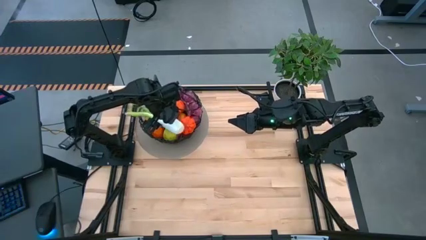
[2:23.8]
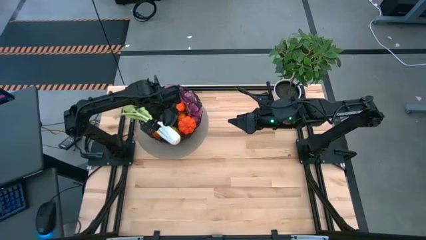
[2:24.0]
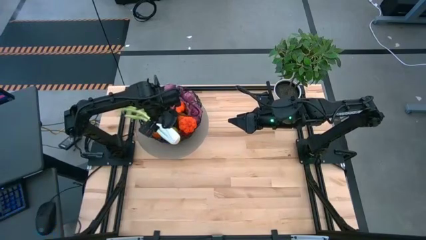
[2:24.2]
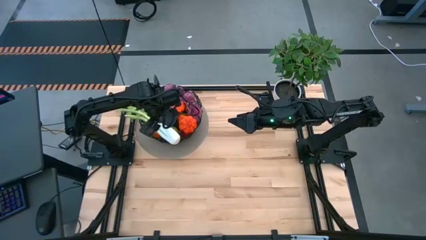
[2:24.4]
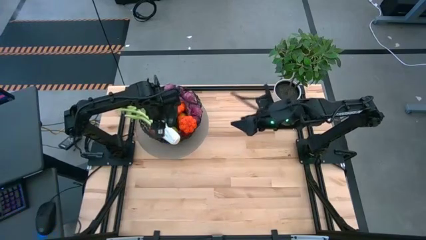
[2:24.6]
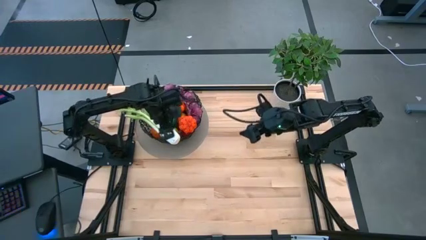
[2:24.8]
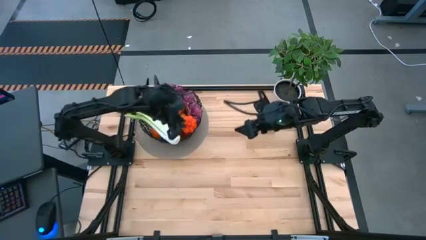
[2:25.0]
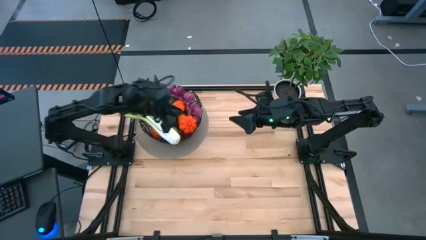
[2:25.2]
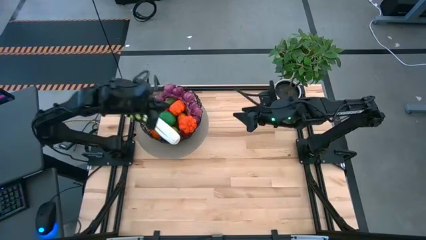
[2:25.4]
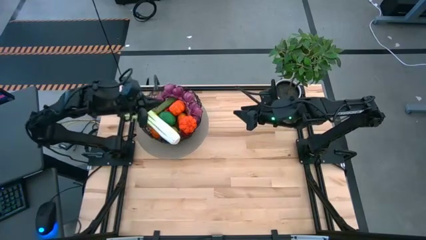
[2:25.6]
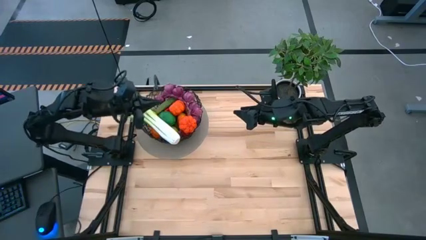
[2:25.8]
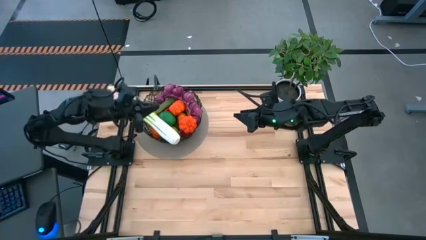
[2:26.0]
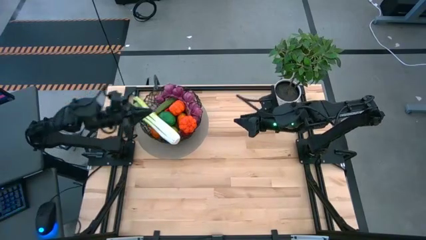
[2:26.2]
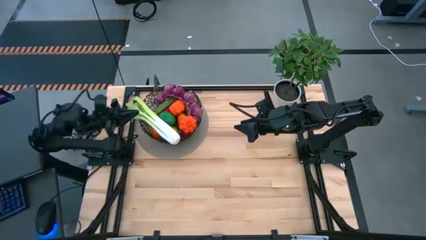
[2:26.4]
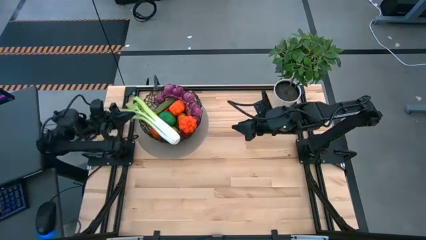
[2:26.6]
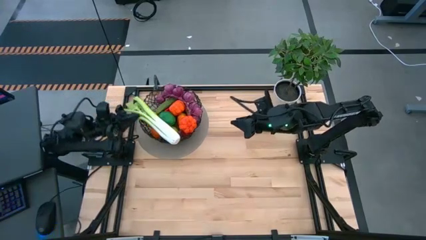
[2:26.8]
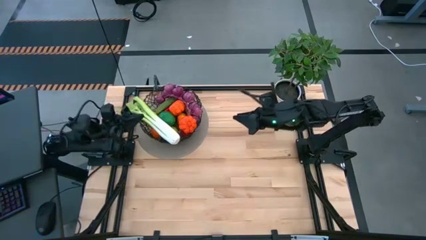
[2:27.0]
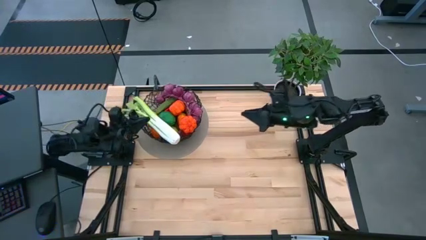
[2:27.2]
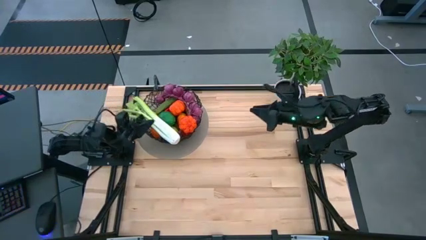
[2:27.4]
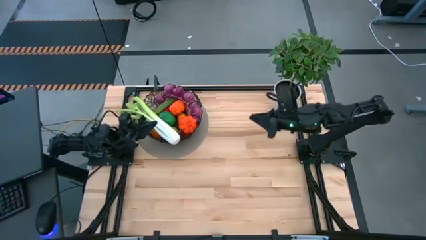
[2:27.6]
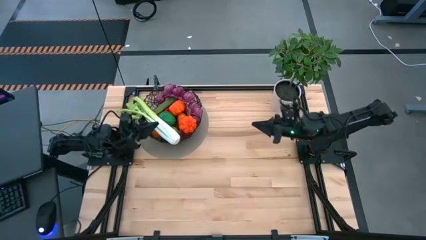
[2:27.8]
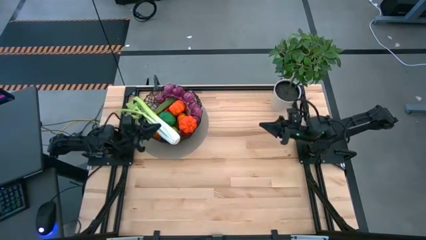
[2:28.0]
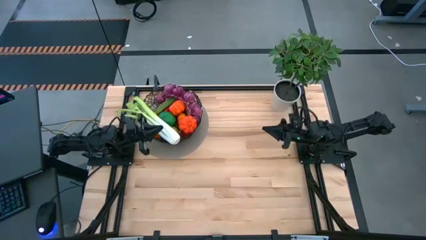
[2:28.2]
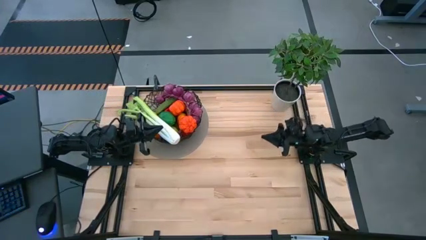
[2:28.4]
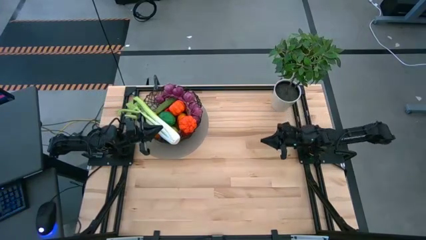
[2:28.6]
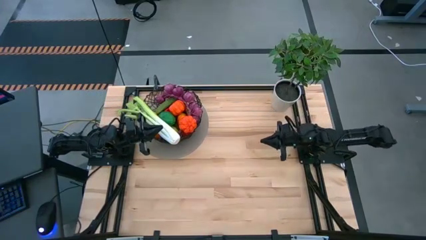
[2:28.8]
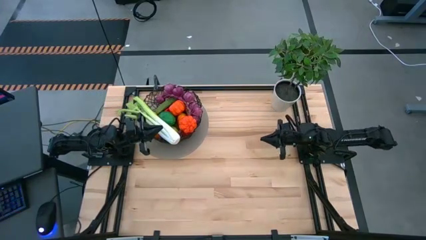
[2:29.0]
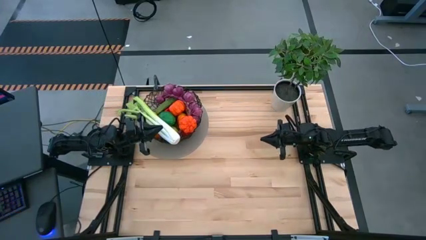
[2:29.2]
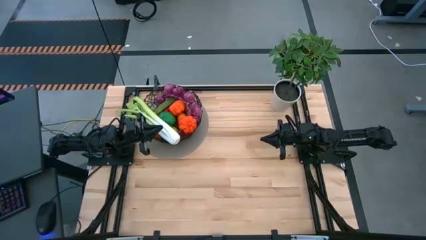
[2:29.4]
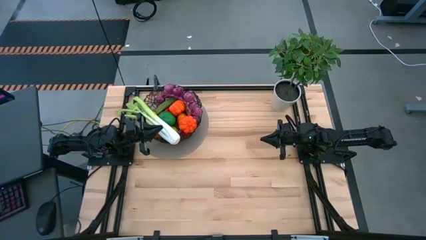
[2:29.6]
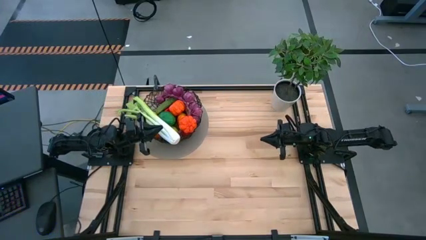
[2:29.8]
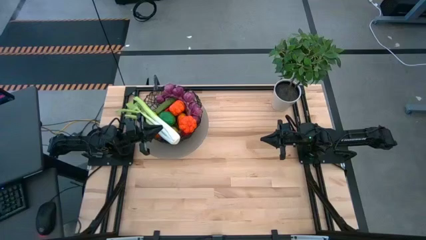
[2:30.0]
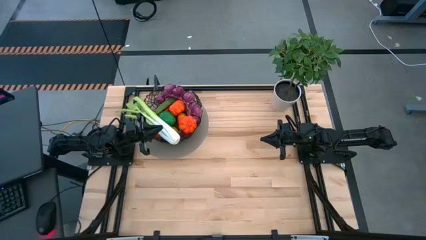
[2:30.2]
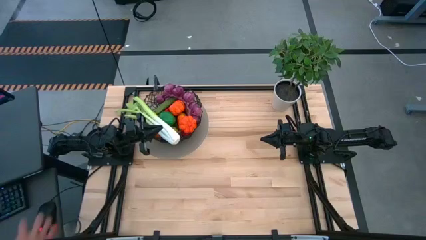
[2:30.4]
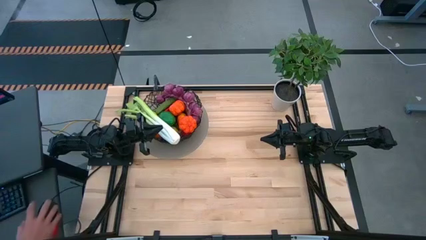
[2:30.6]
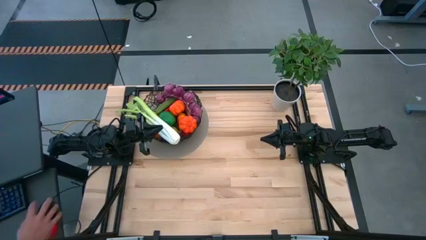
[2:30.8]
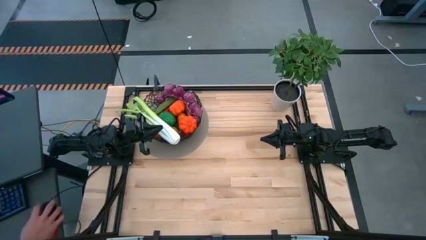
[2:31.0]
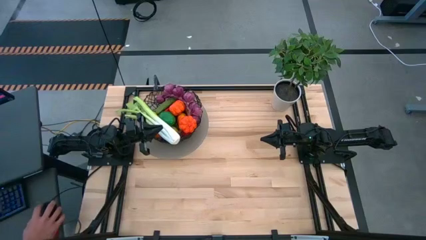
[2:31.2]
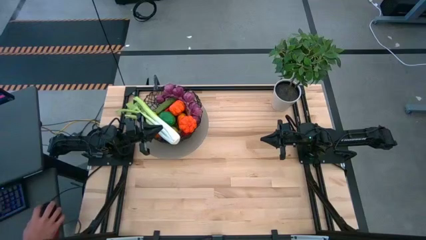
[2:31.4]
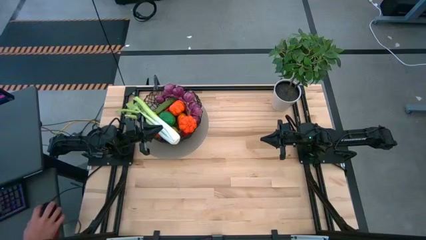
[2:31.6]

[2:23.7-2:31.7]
Task: Build produce basket
Return to Home Position

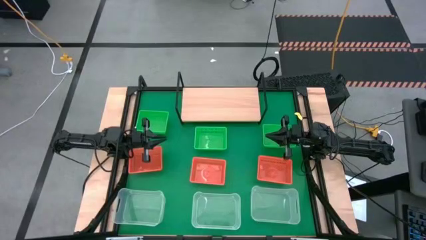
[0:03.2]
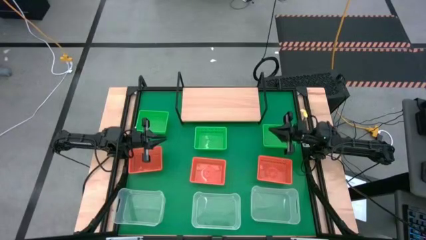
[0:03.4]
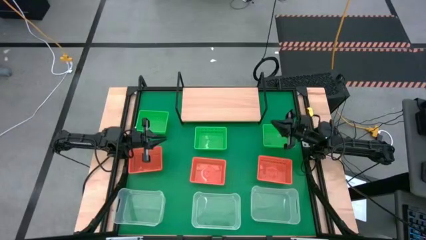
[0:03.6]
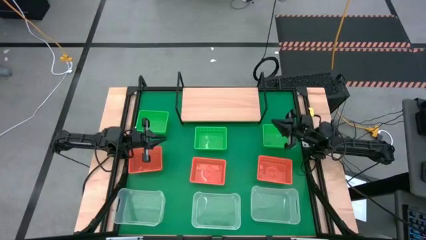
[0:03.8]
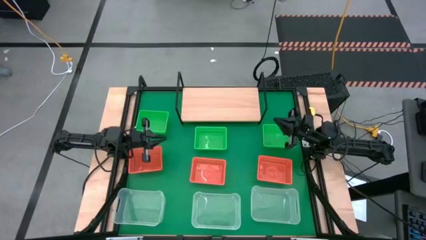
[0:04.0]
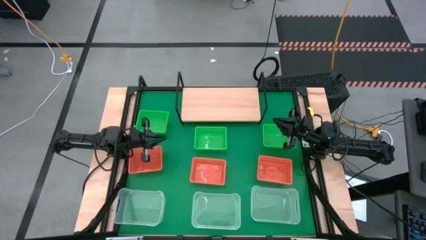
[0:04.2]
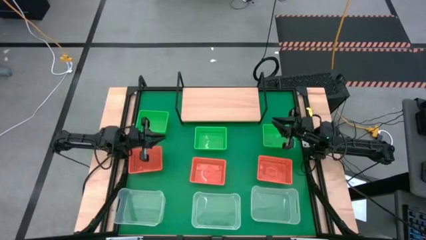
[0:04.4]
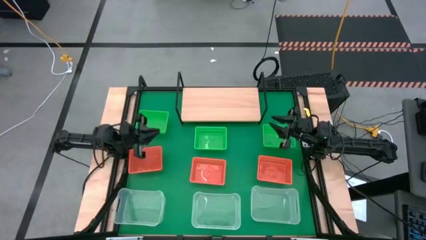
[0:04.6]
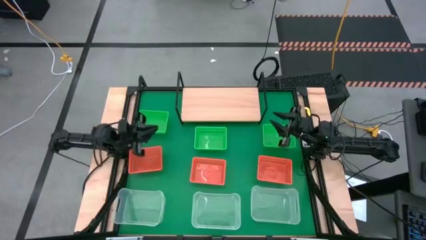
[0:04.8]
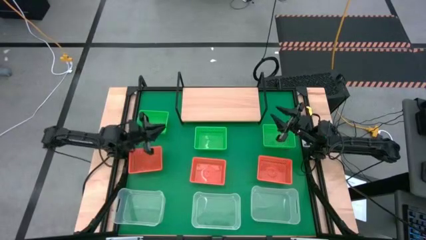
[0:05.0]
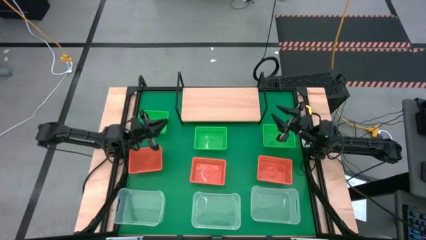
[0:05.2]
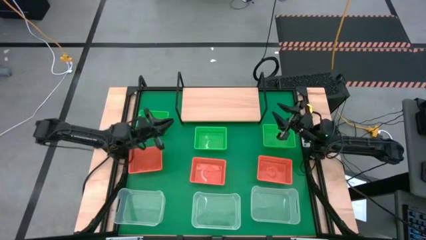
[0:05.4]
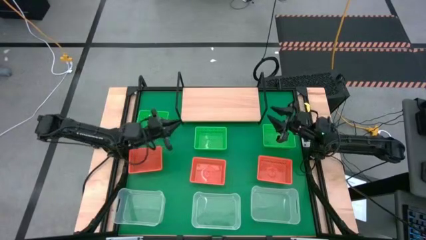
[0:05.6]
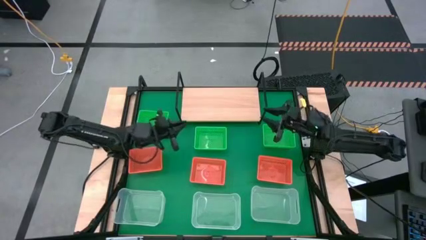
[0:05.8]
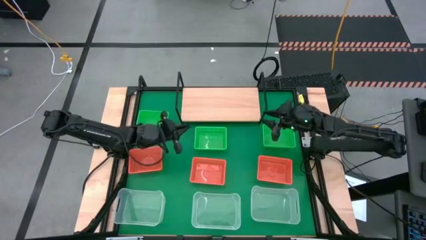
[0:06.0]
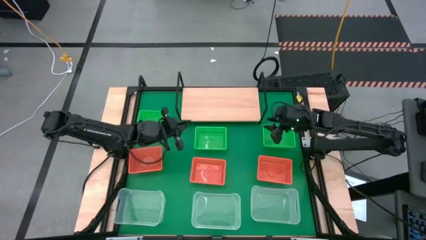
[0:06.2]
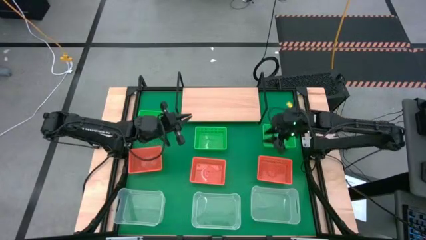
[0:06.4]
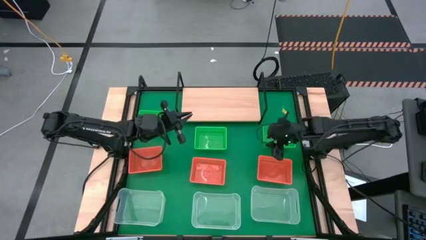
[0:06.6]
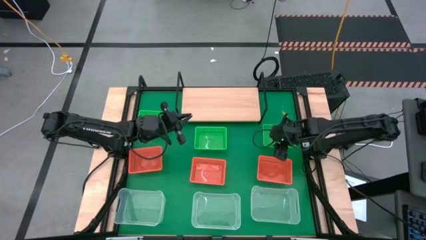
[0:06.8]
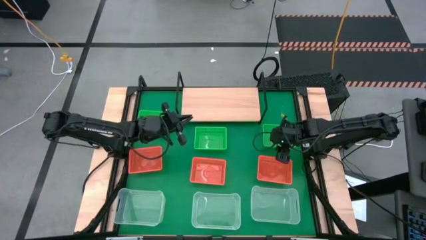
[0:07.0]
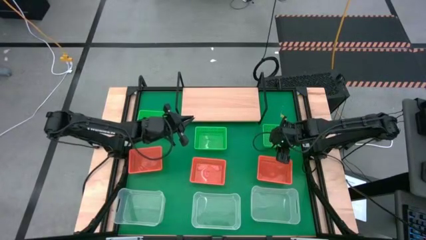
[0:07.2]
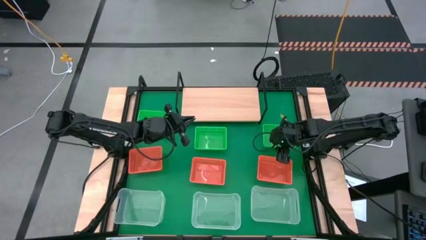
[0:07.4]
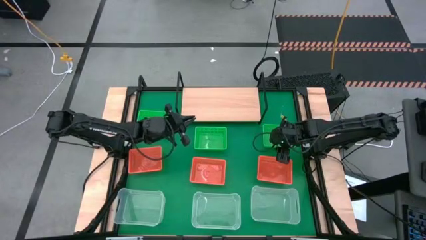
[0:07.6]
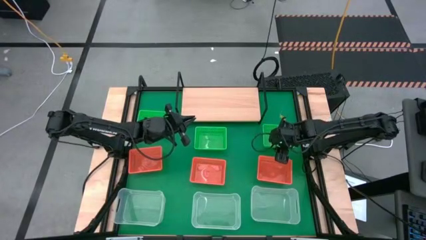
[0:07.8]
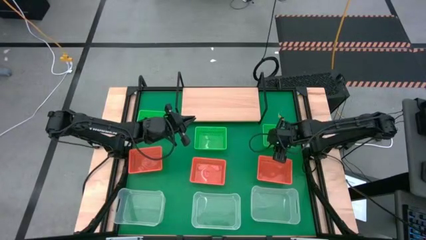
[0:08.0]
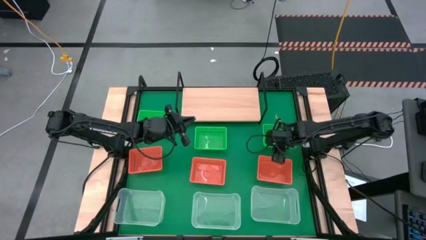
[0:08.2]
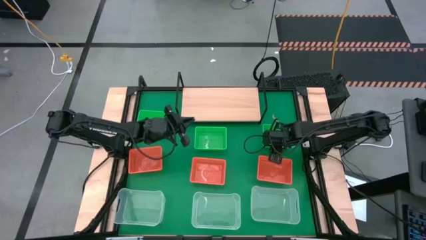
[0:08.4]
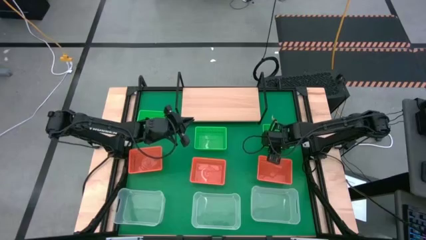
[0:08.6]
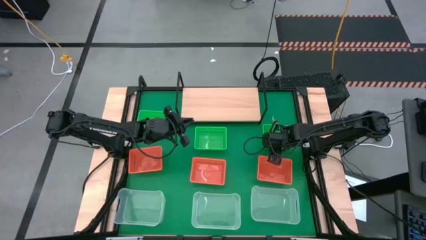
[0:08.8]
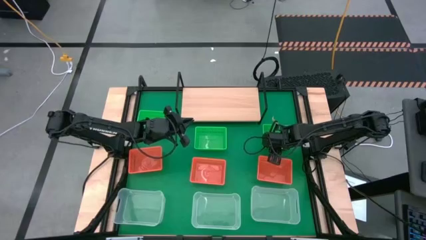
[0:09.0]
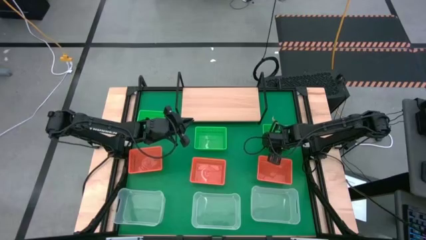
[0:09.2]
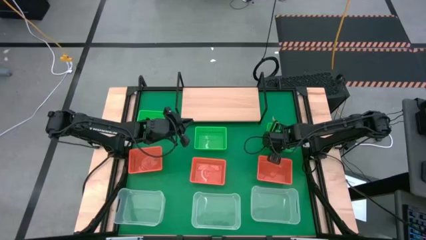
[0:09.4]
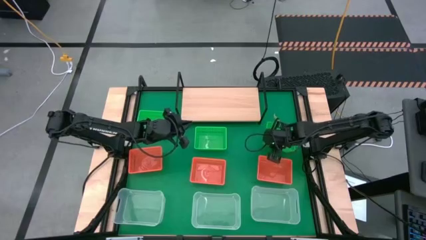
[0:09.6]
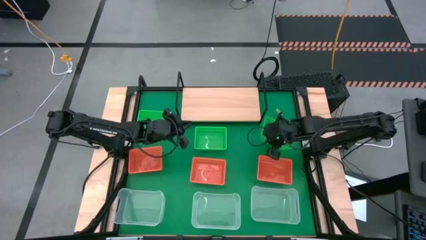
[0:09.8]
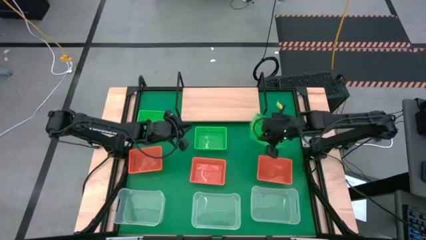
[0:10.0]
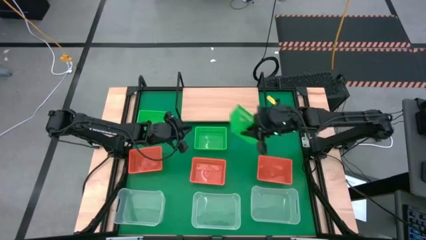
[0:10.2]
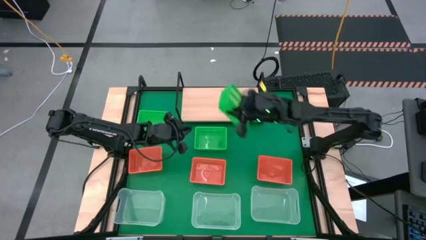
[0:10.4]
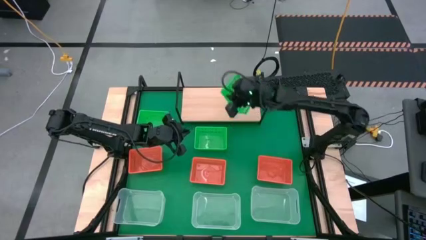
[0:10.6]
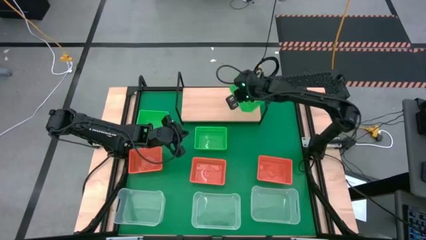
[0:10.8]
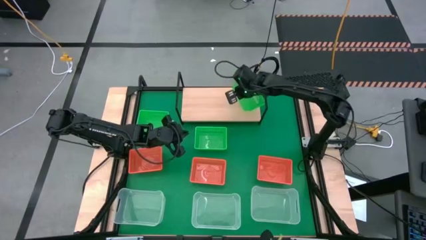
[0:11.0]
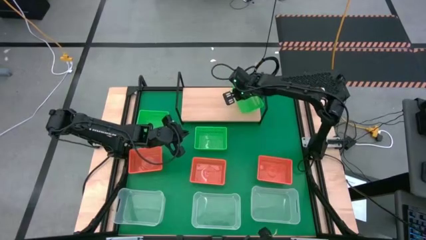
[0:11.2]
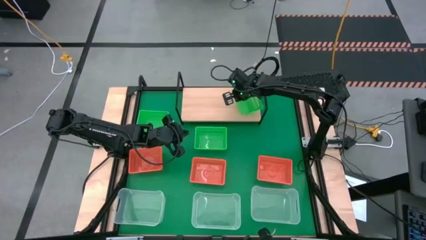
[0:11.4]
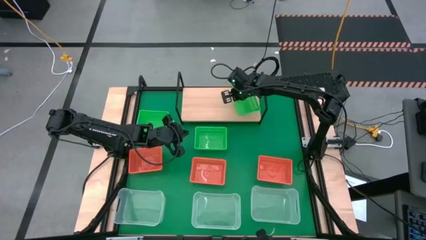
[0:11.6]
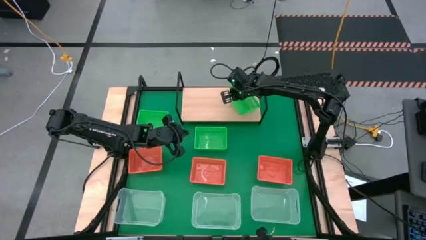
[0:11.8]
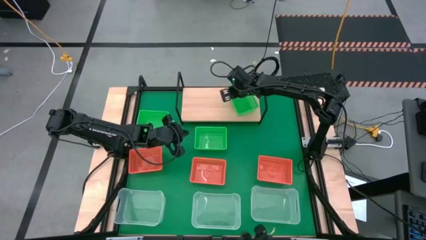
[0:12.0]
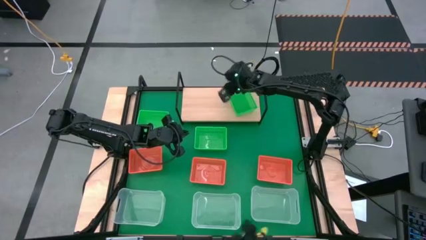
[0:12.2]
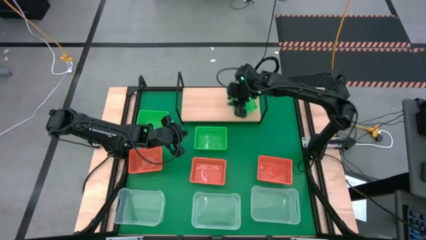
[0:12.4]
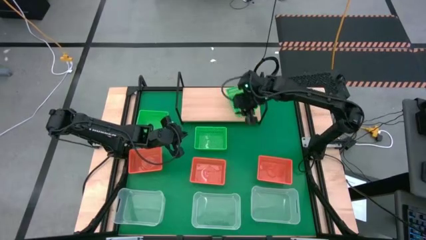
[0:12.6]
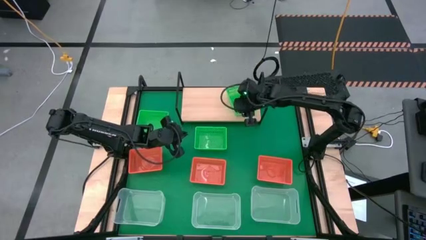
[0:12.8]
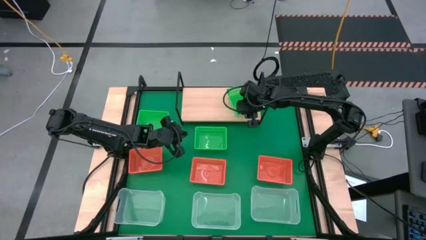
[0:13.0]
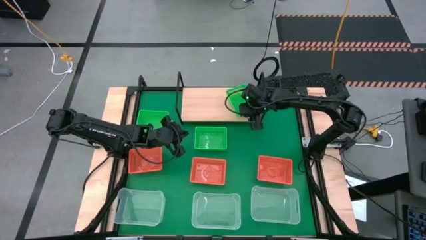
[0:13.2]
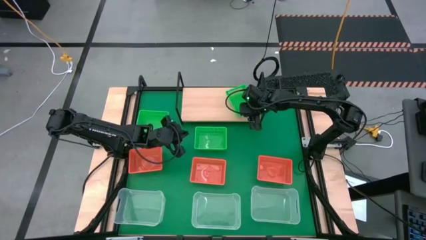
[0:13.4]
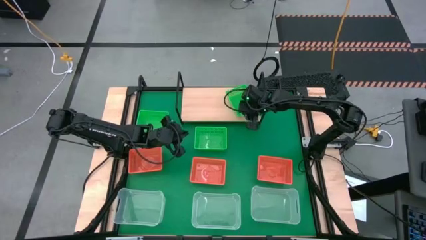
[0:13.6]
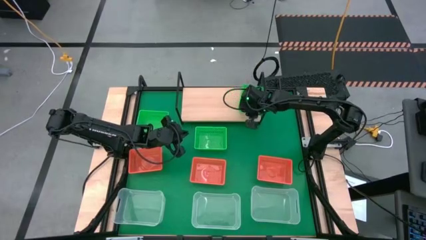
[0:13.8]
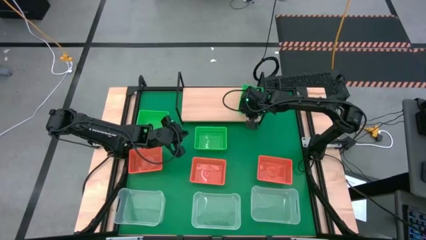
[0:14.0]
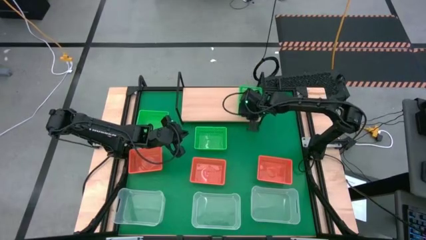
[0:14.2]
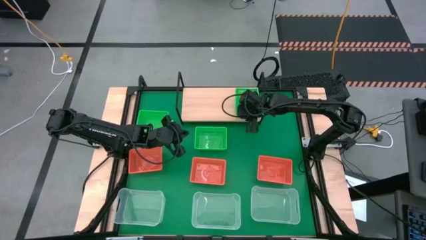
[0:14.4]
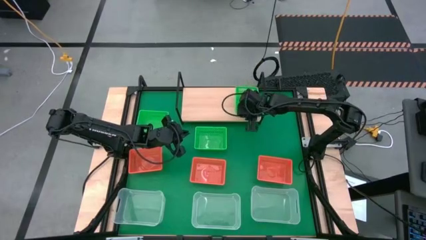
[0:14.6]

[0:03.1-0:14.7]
Task: Stack baskets on shelf by color
Put the right green bin on the shelf
